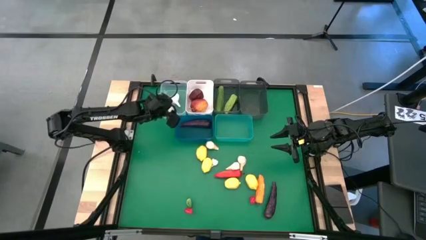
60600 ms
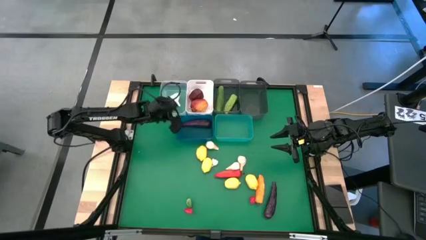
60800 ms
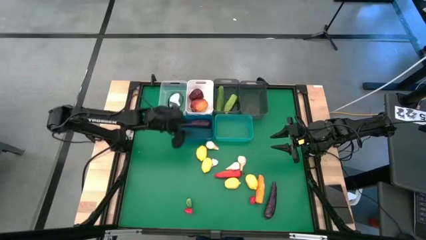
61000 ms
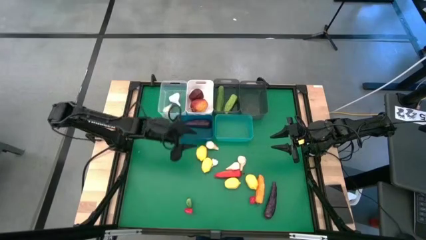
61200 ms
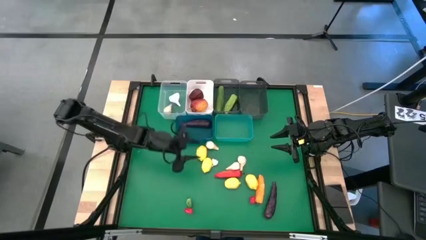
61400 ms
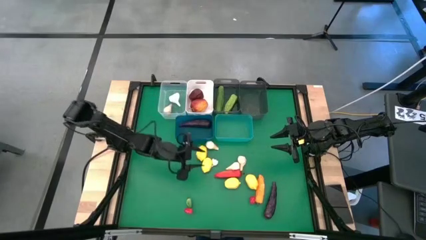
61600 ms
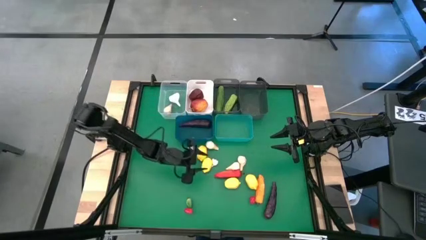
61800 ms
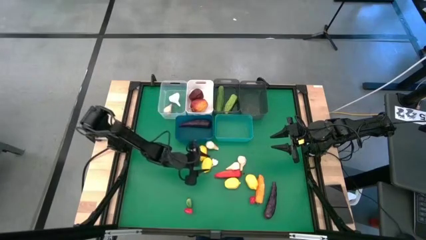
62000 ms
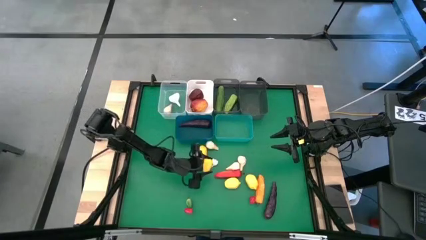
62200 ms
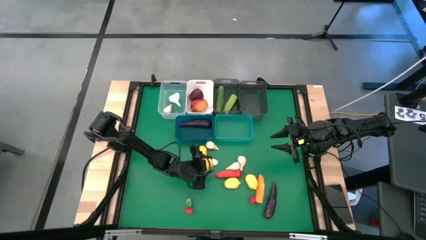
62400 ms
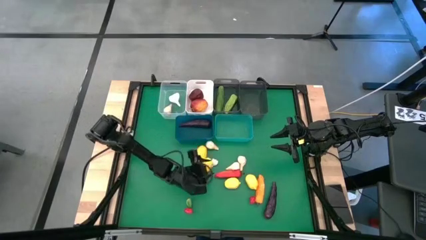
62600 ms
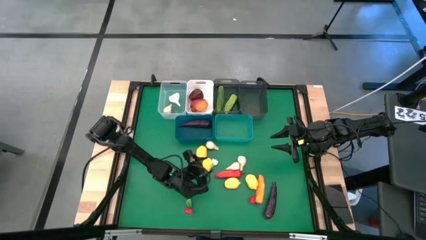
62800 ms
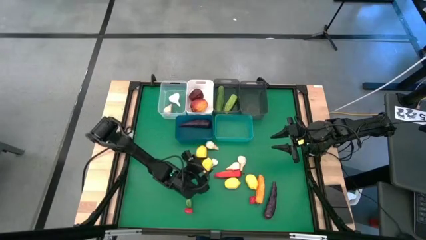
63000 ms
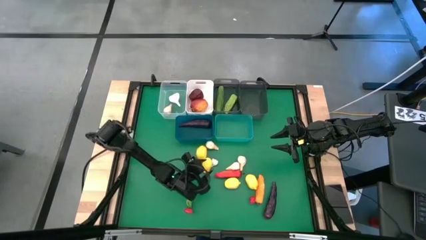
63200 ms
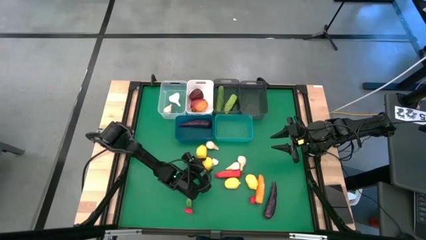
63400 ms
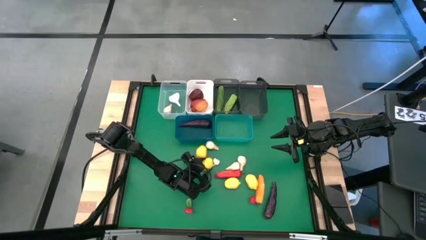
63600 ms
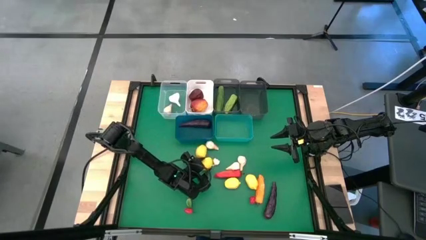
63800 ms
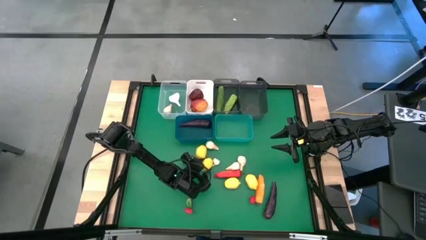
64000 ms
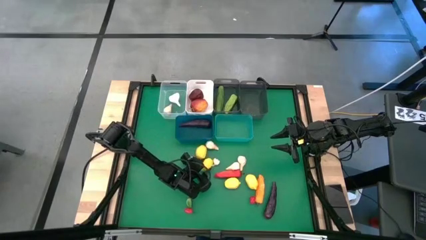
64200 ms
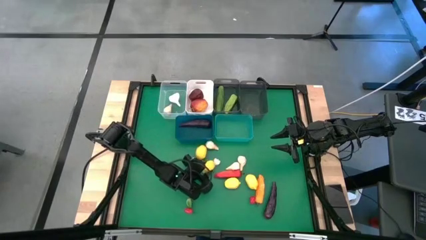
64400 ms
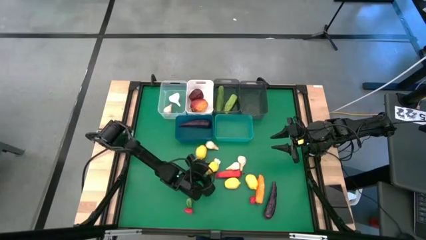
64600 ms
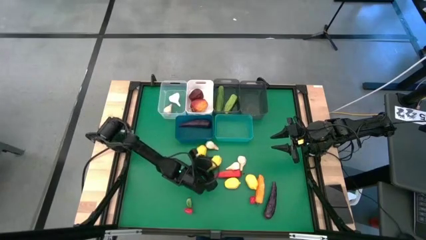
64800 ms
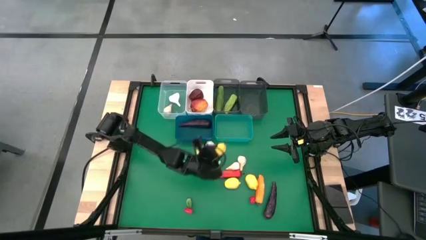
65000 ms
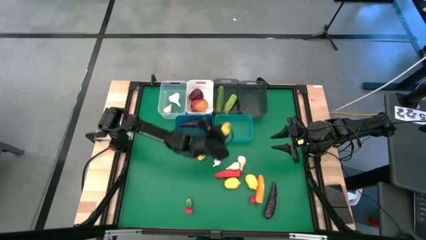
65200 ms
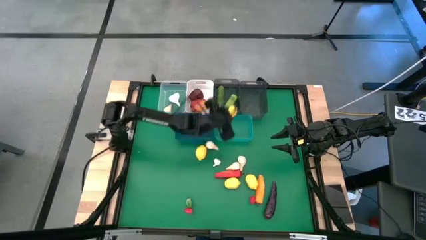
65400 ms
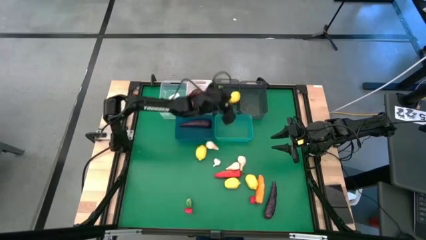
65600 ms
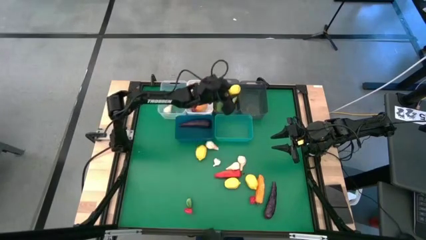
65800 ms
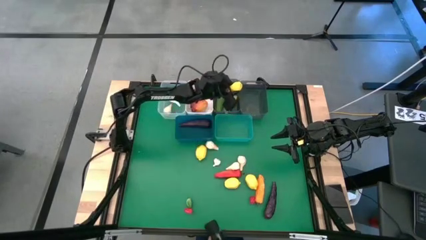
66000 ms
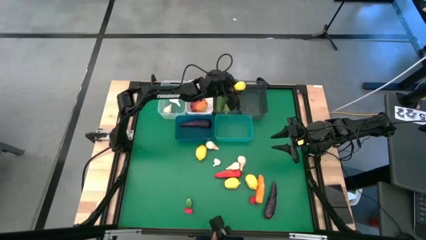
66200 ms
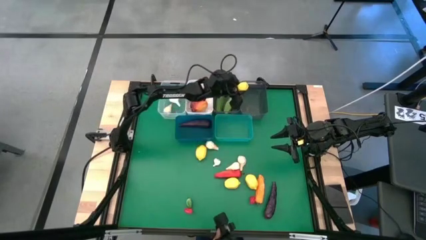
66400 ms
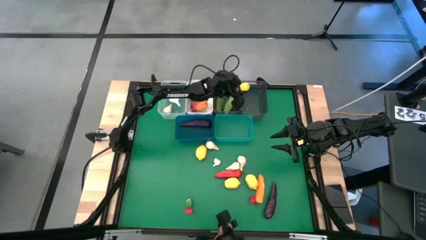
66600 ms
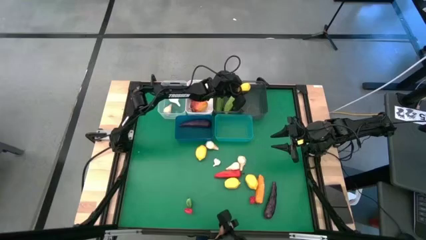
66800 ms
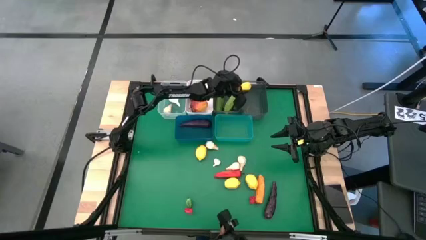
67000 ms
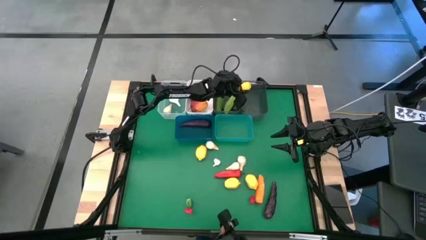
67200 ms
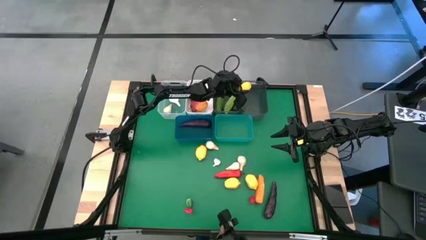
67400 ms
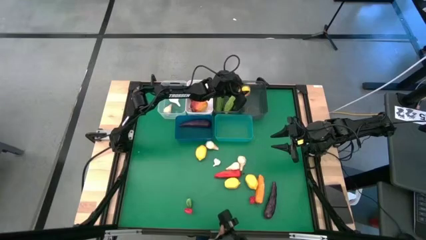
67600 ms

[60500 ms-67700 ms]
Task: Sort produce into baskets
Put the lemon into the right black bin

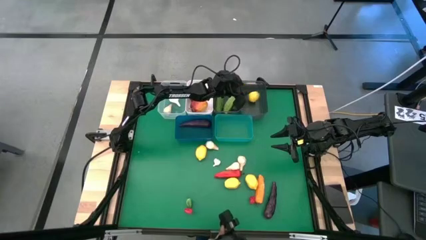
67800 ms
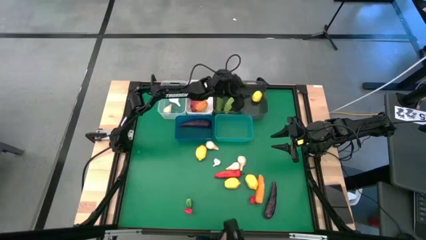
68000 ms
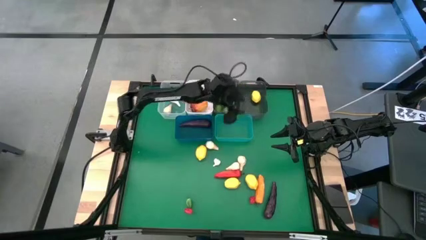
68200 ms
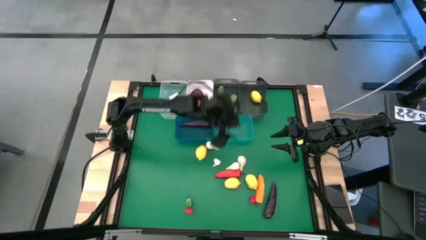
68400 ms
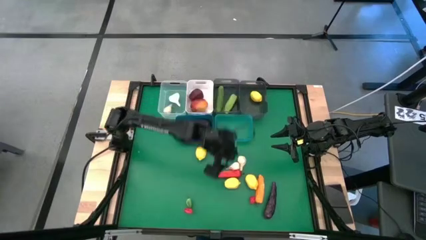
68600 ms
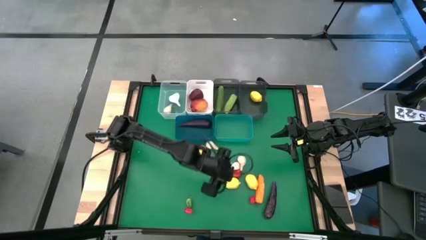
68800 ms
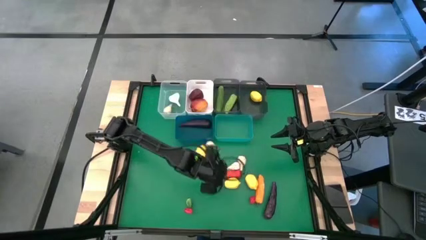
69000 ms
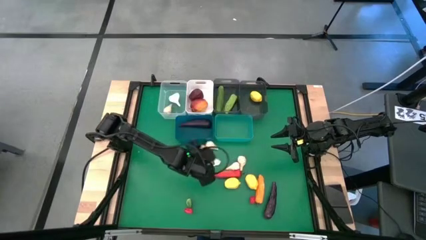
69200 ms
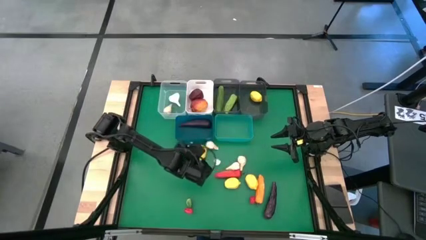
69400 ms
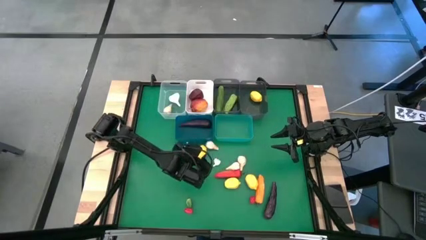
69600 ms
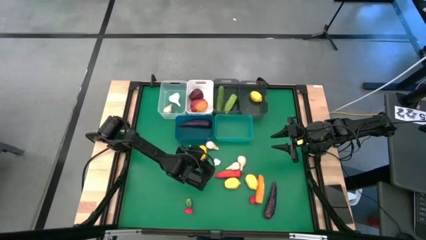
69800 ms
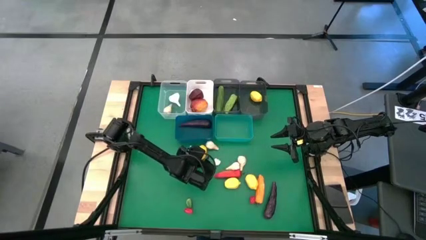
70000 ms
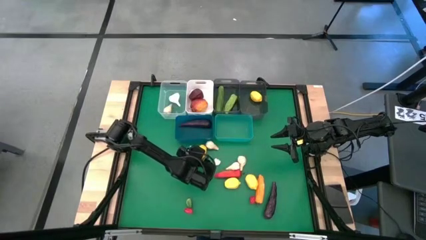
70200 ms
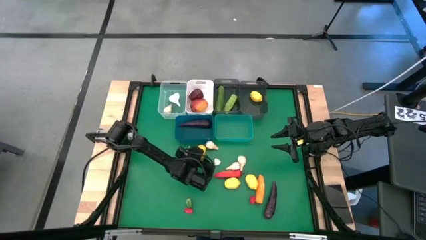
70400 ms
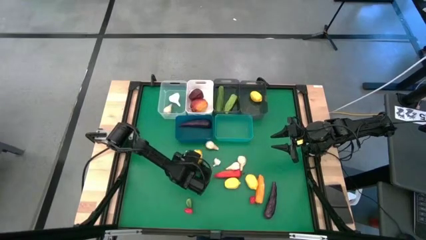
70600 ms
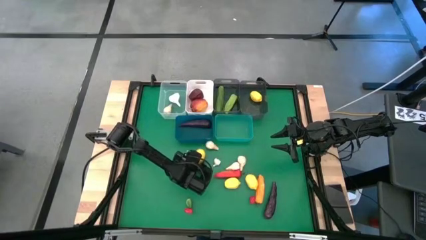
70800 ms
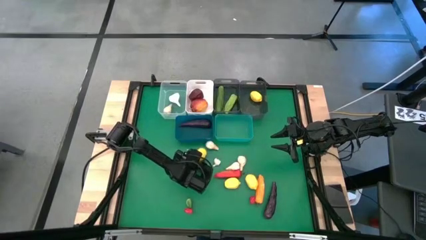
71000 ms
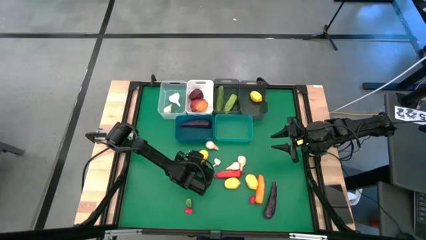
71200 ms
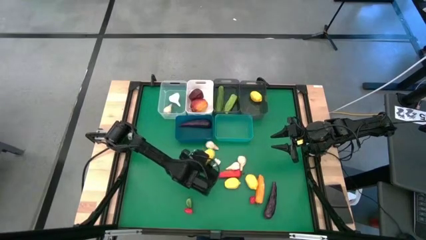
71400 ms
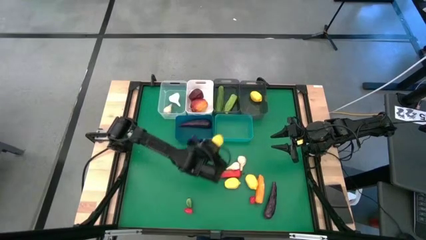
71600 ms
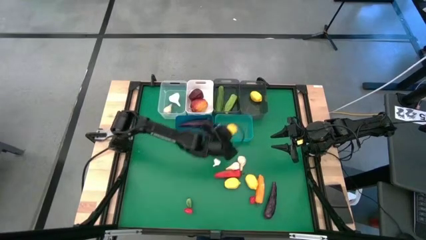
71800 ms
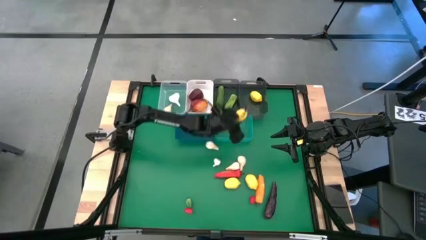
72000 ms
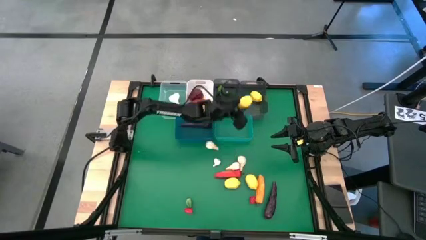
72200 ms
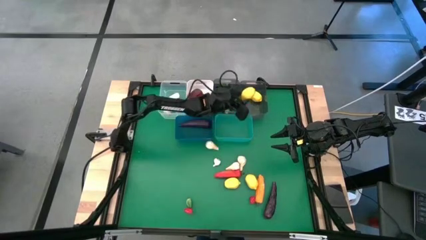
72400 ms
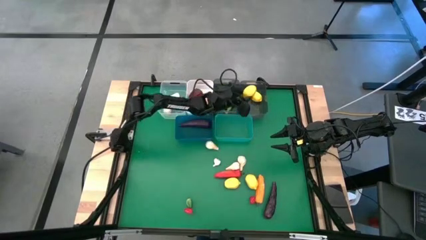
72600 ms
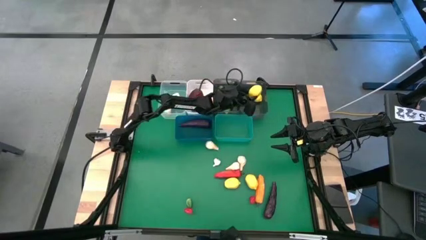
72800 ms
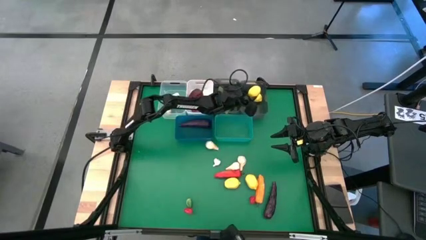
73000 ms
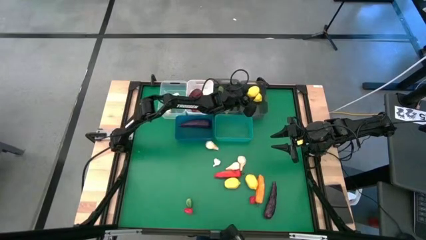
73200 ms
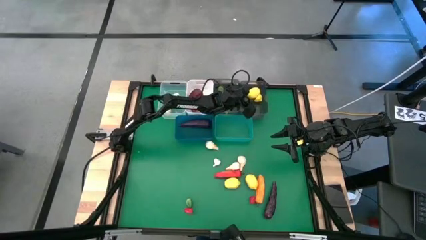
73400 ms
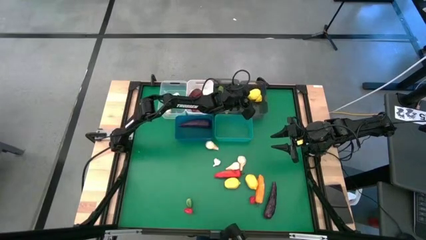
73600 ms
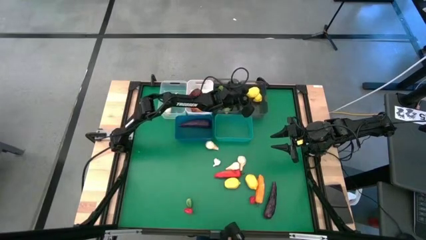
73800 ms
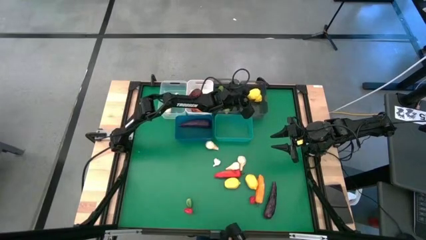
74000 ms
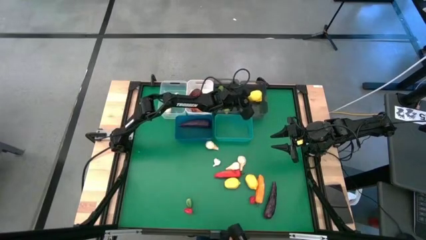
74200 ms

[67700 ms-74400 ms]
Put the lemon into the right black bin
